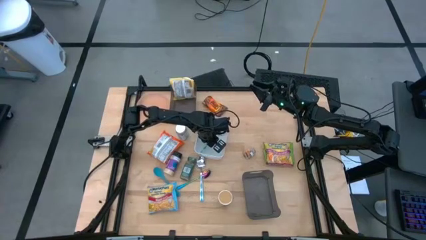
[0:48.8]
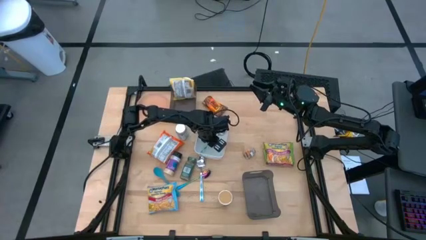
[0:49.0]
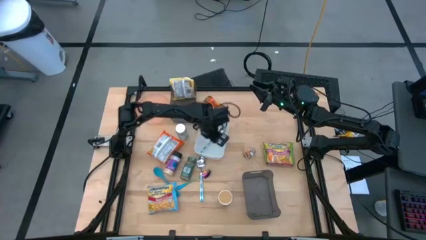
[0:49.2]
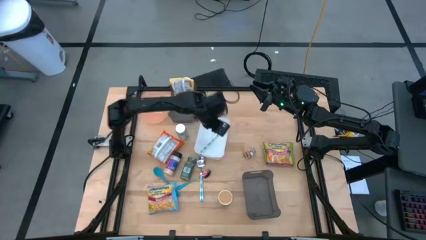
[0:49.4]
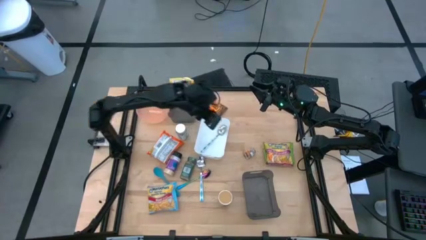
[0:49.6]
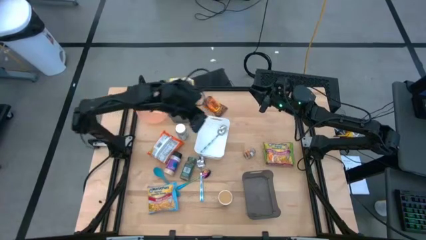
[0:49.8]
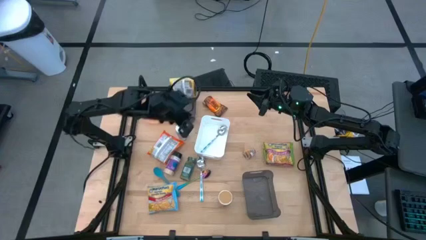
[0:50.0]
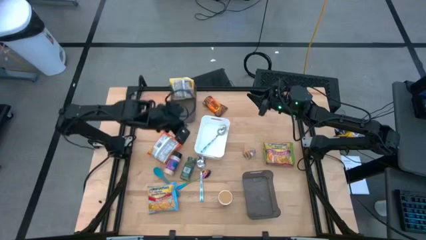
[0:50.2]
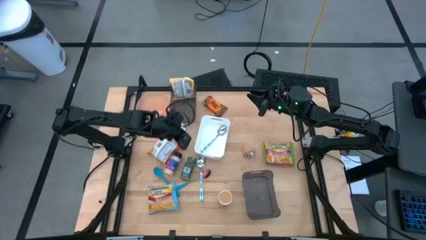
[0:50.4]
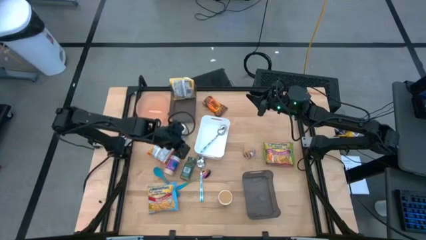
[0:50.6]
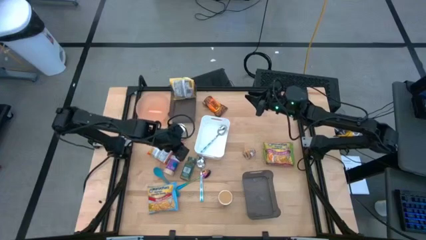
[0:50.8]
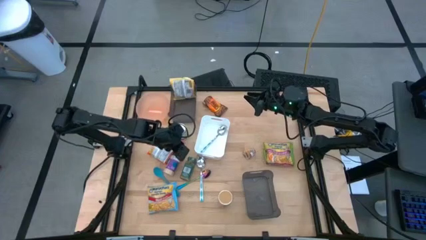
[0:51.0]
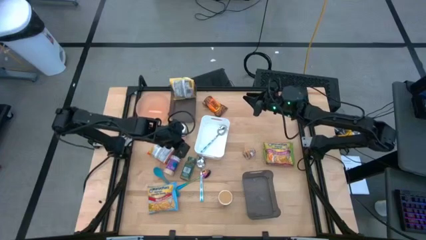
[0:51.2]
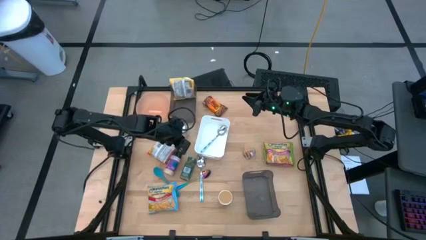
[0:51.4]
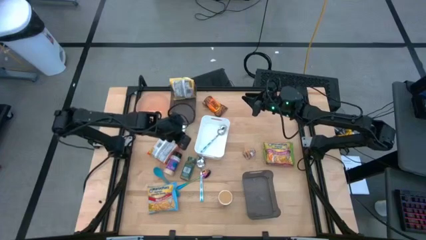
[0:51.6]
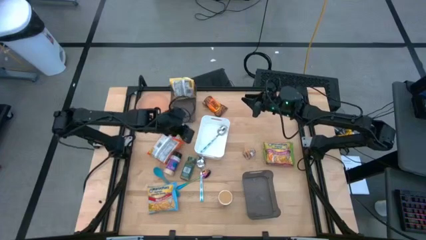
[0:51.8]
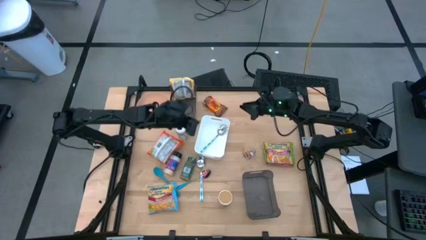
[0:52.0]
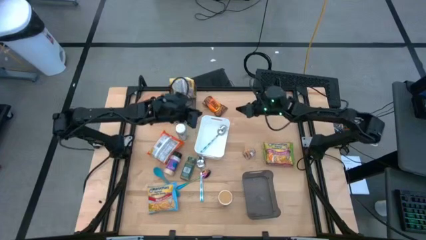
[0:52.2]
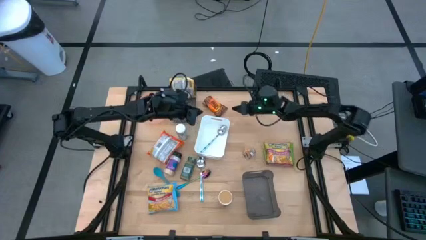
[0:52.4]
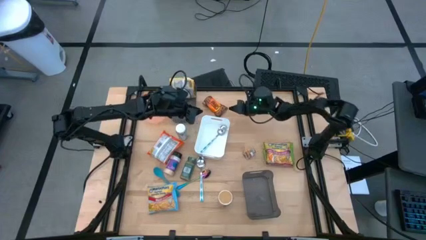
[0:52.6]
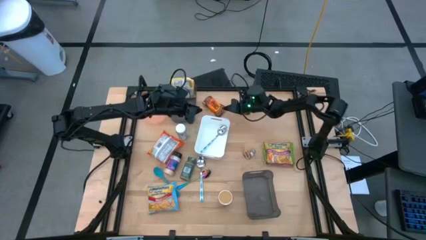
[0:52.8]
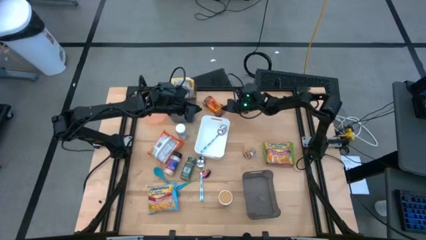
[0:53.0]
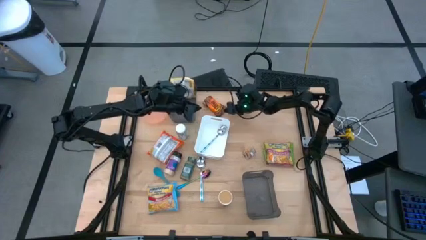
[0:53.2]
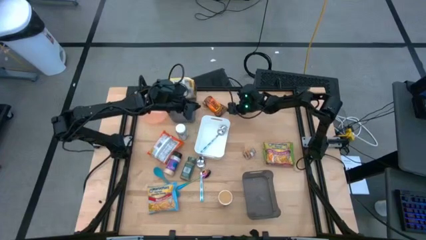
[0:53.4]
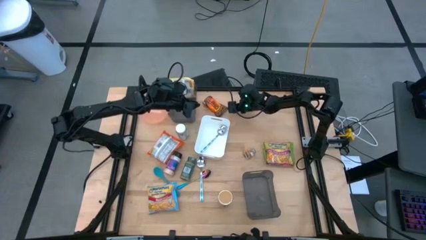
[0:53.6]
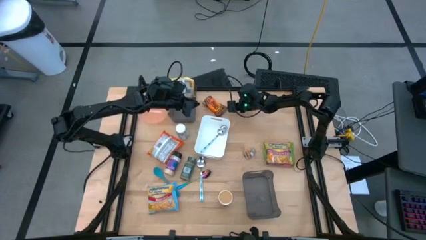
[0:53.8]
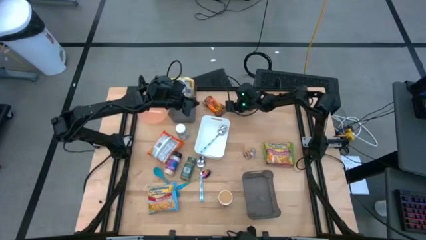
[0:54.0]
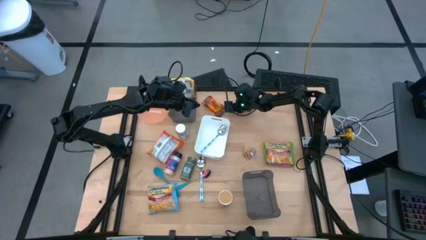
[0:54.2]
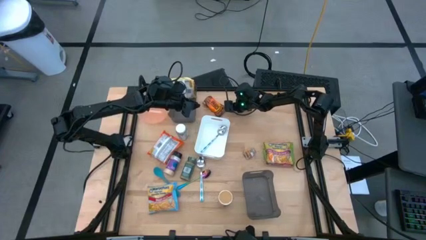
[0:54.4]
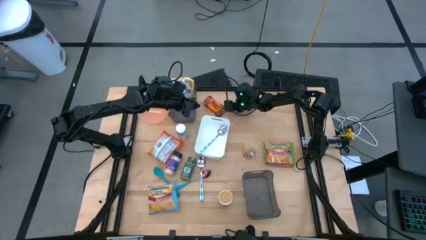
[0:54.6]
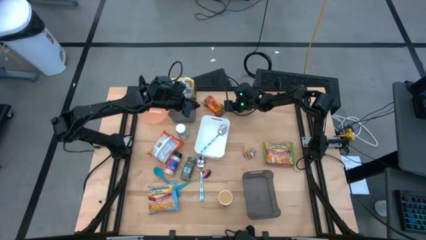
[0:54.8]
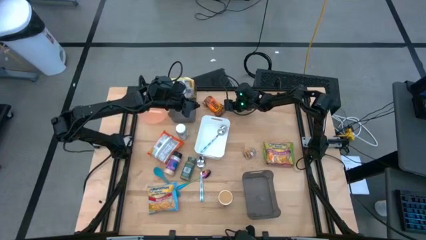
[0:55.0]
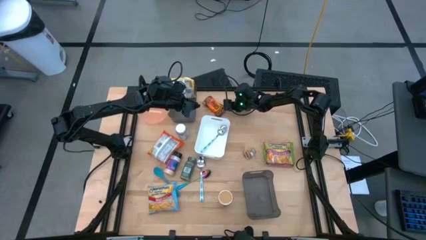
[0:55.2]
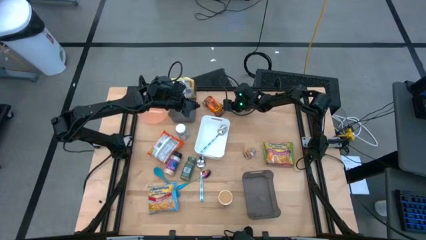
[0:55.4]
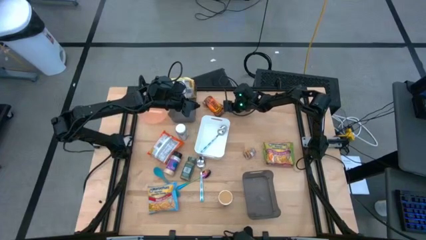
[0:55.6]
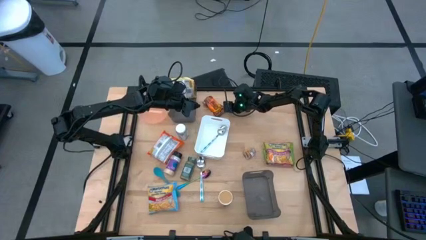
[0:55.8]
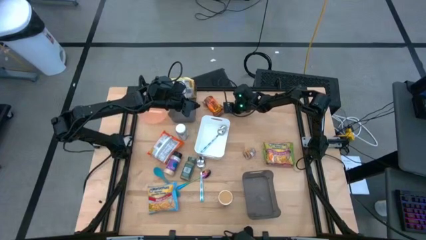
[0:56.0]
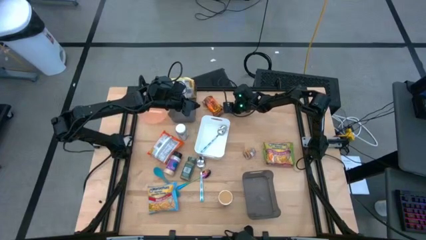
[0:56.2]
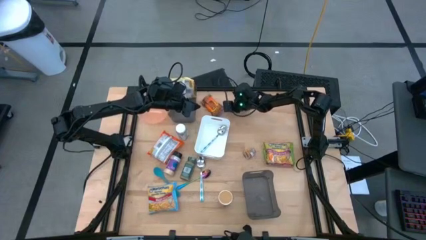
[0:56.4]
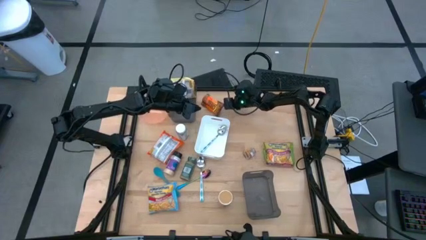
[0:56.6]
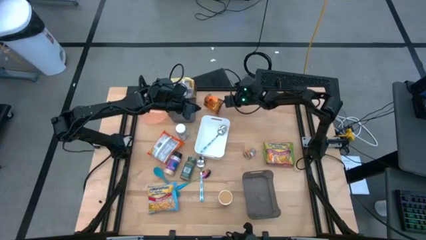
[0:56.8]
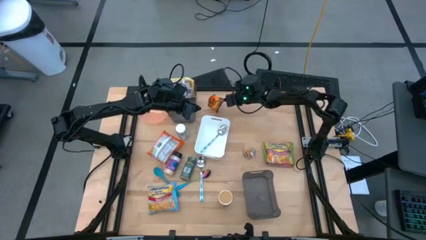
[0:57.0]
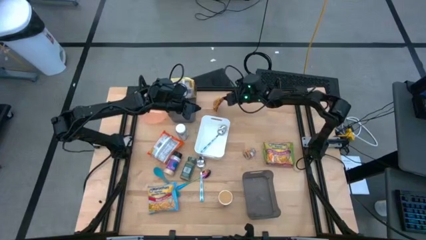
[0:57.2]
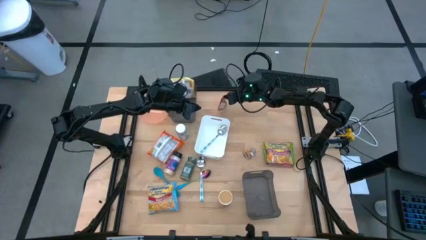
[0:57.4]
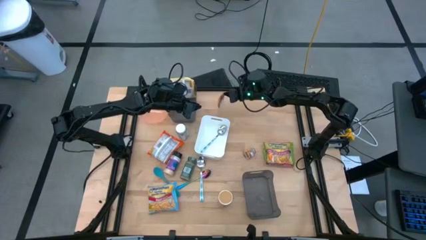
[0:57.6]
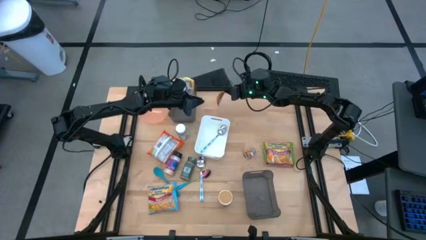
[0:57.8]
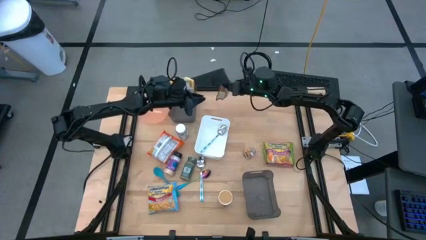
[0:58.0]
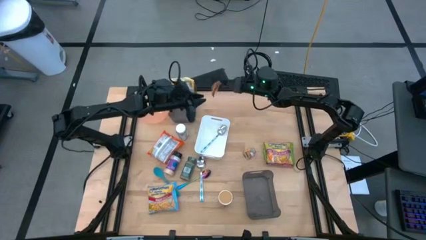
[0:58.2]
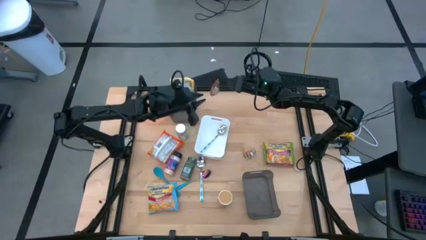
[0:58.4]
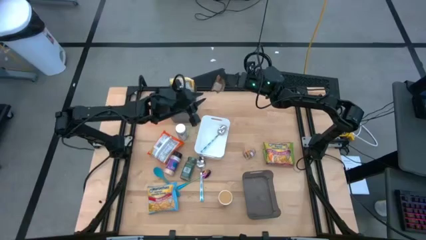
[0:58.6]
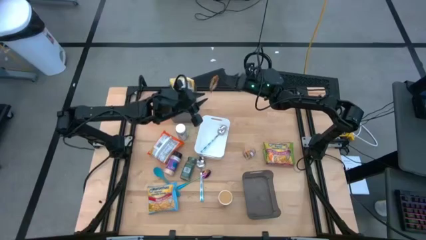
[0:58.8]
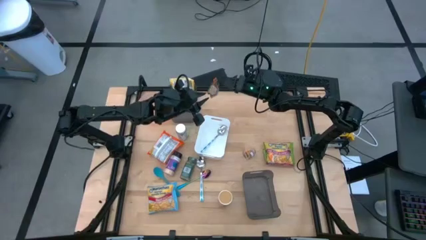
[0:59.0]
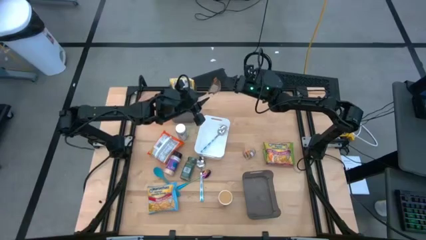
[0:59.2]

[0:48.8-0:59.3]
Task: Pick & Place Food Item
Put the orange seasoning pack into the bottom black bin

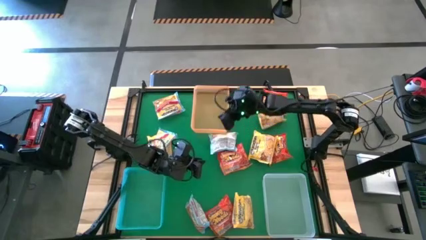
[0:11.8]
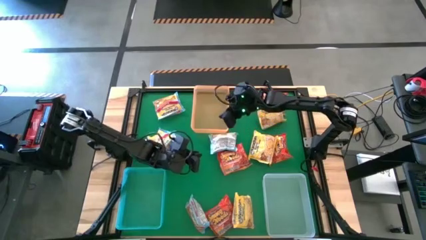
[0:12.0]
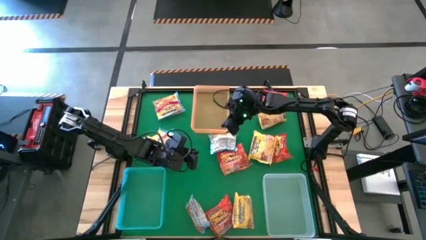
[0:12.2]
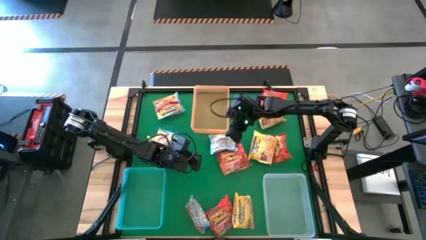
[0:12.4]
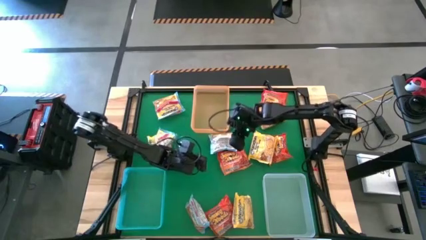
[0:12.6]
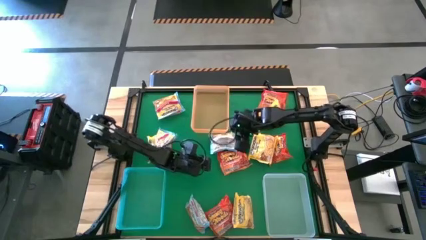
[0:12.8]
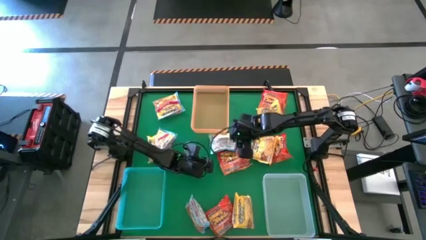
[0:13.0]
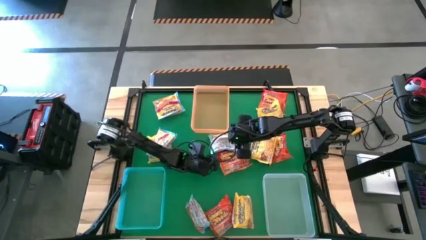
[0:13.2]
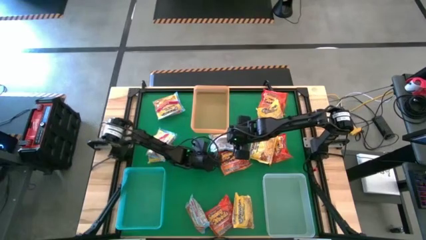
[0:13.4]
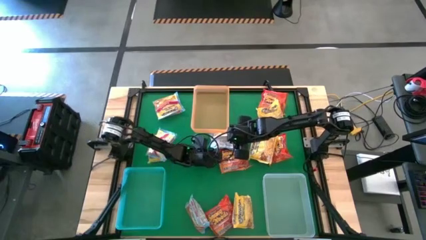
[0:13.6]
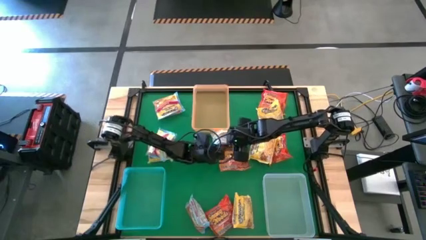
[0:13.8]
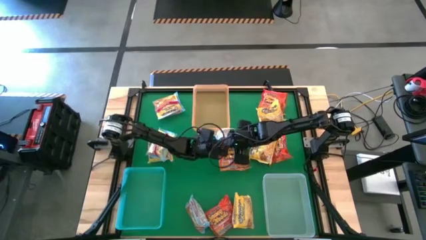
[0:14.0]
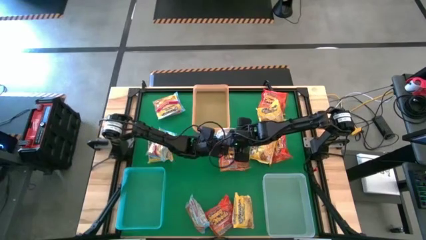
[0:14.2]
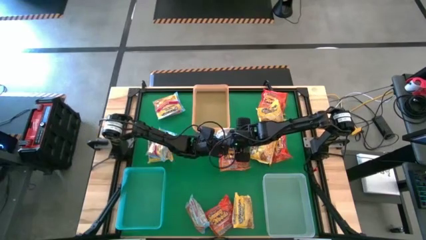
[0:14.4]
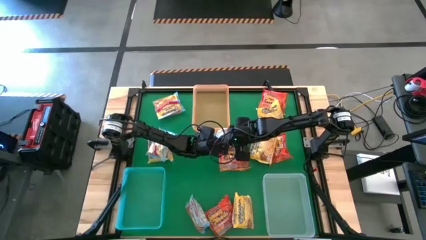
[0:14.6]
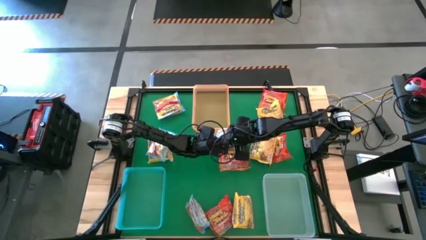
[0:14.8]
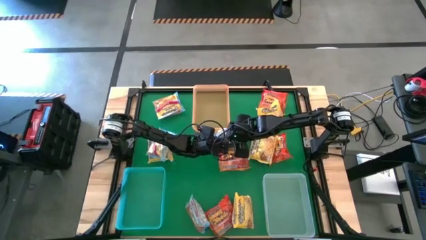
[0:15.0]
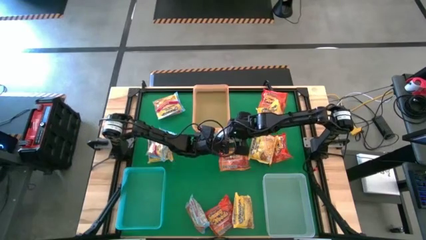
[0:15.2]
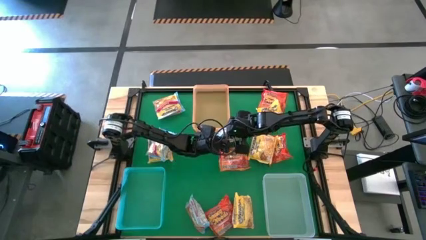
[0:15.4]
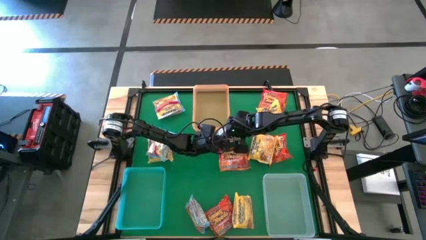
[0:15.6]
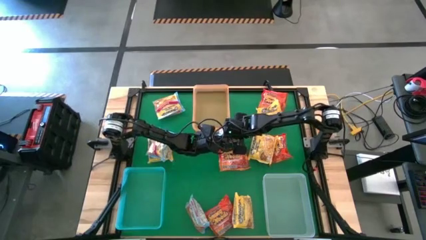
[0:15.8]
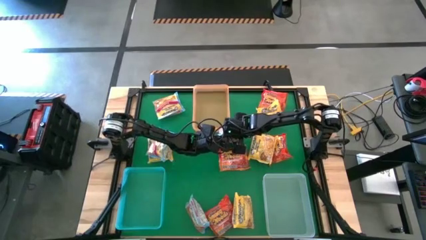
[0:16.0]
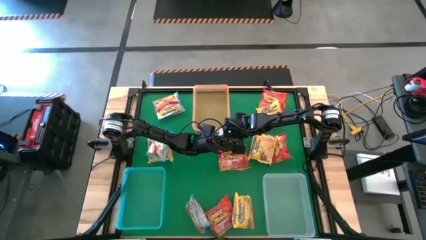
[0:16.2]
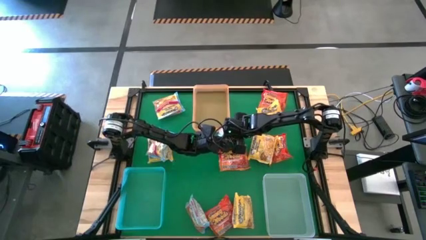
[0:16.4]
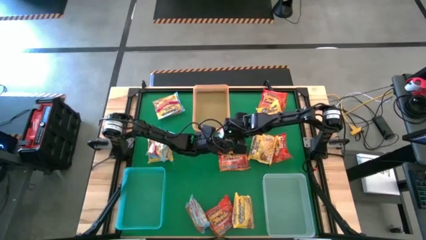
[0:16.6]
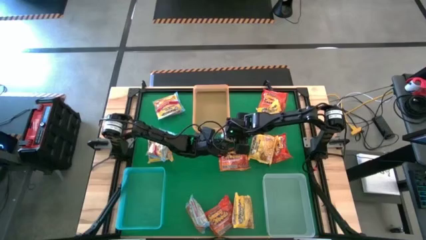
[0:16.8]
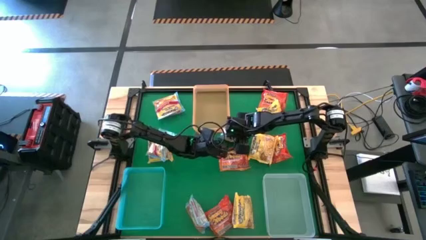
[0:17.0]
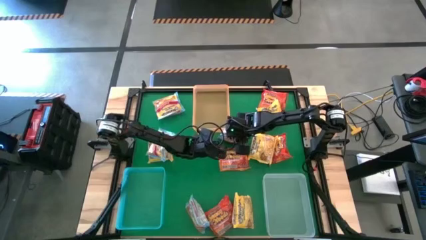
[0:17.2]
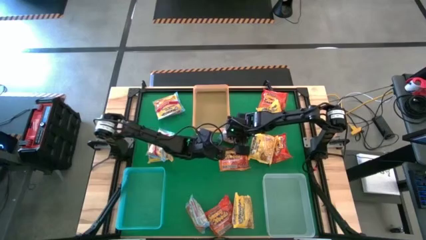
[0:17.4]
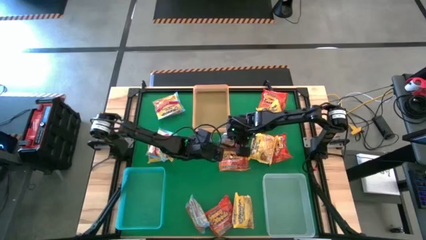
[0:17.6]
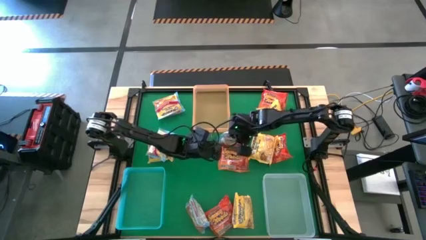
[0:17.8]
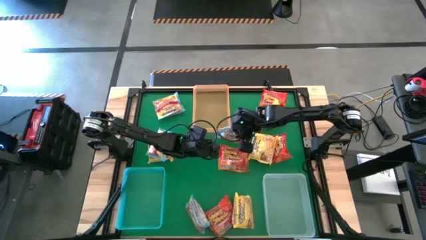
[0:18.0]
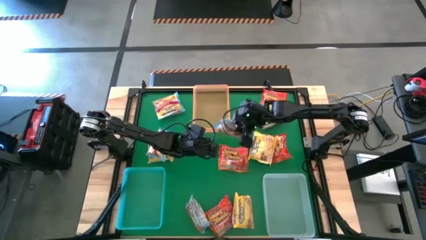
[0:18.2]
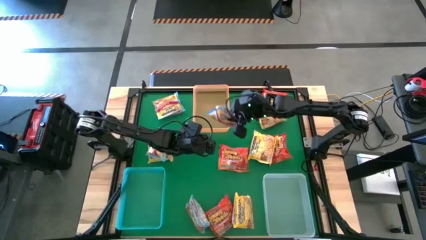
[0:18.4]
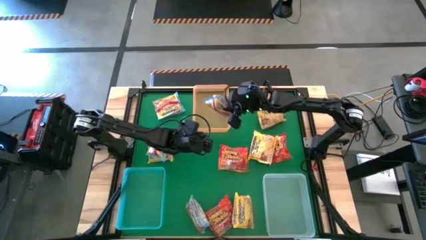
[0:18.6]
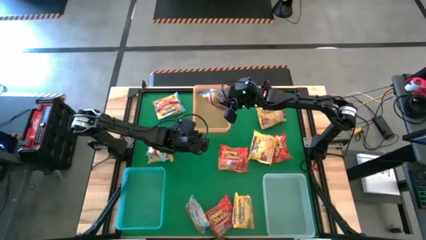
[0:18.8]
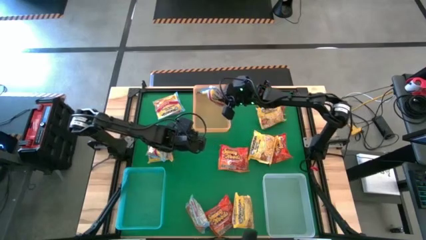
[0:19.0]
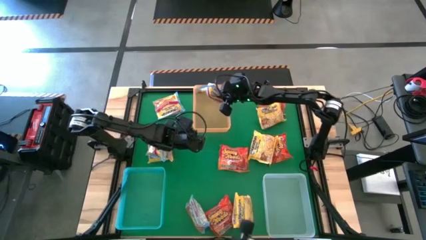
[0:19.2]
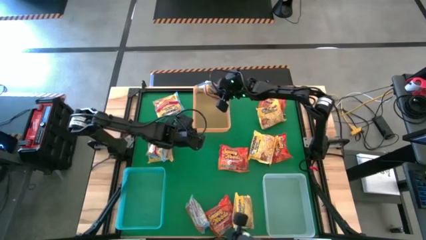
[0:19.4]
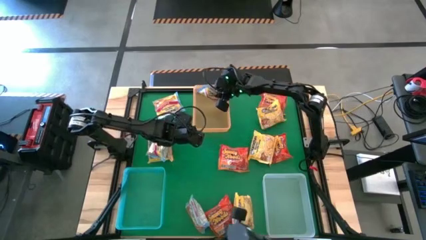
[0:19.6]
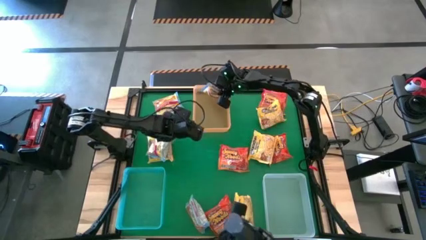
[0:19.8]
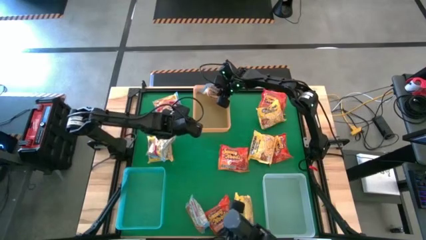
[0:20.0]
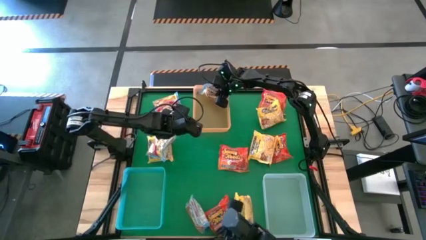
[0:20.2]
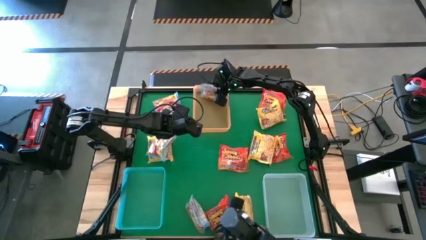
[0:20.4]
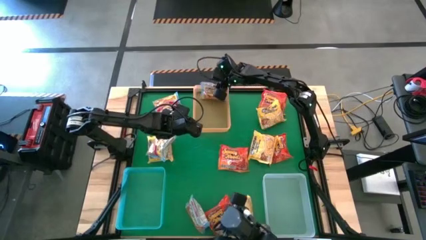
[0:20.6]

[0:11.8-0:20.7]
Task: Sort Maruchan noodles
Put the blue noodle pack into the yellow bin
